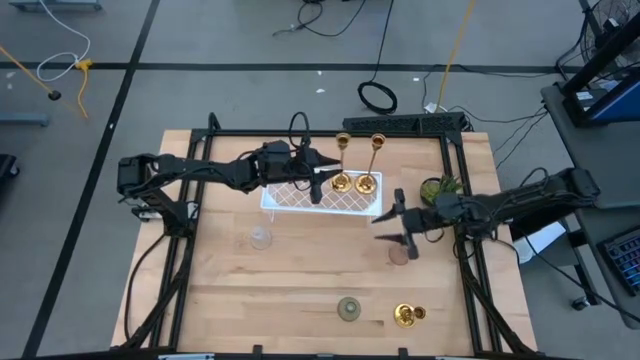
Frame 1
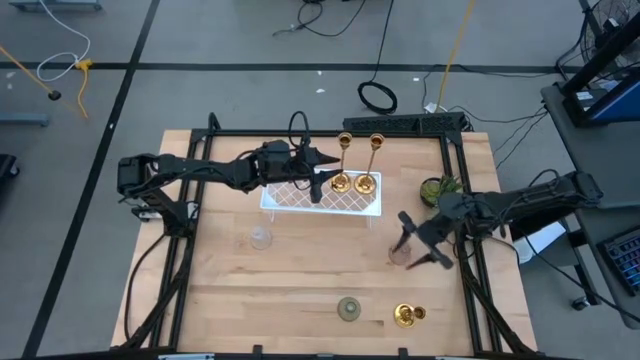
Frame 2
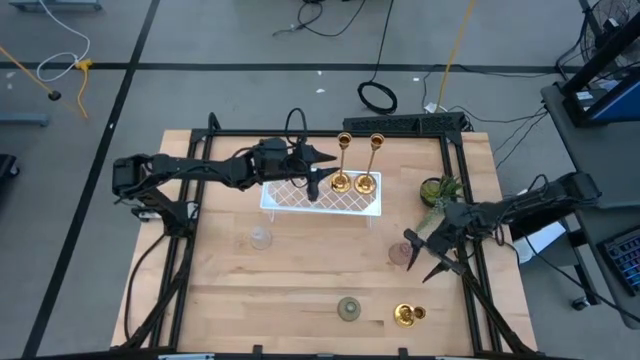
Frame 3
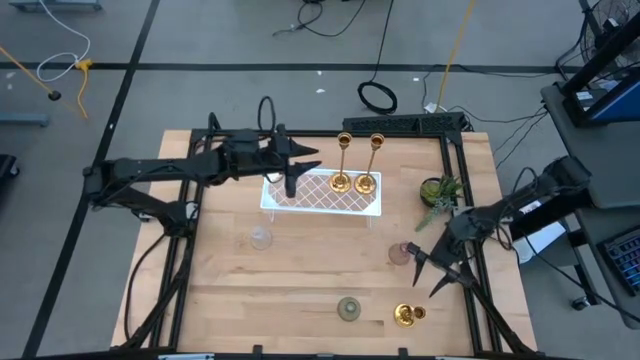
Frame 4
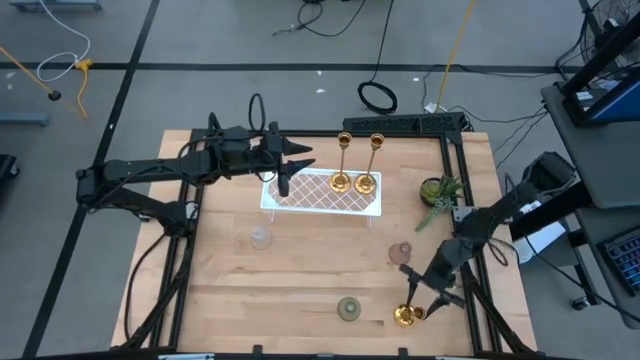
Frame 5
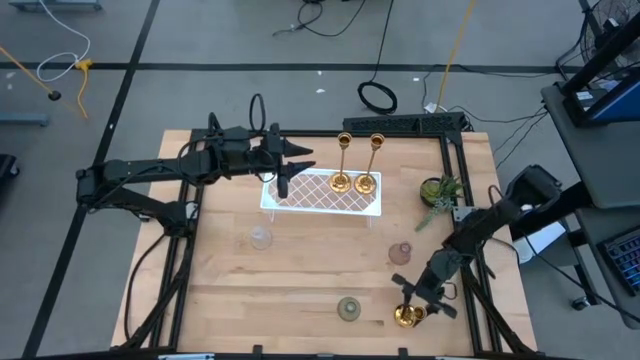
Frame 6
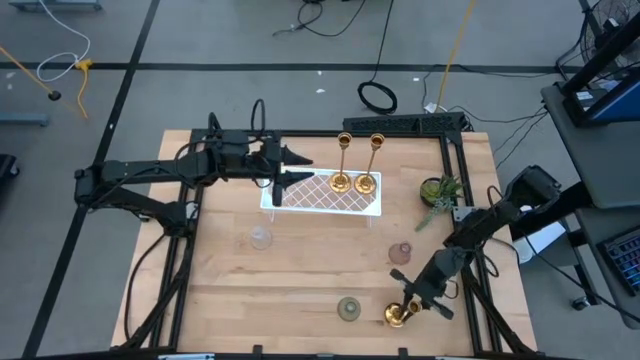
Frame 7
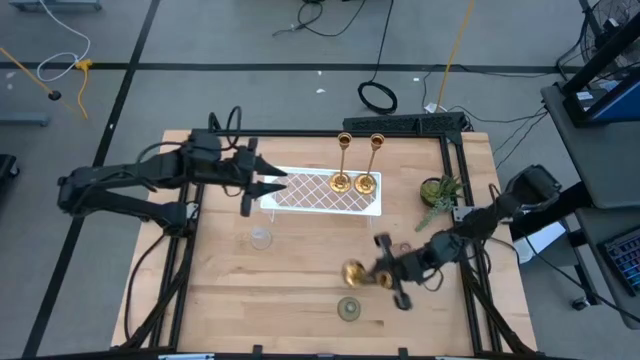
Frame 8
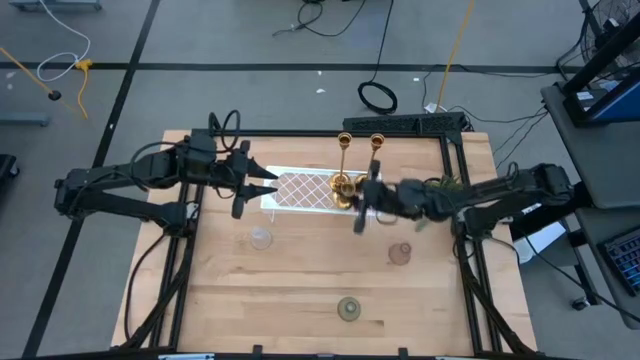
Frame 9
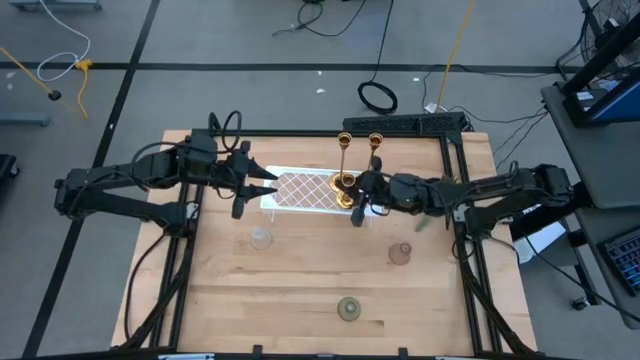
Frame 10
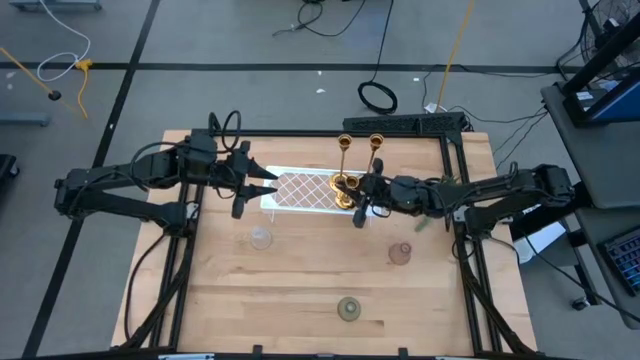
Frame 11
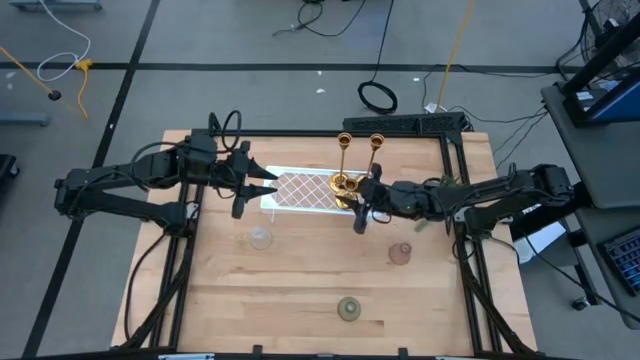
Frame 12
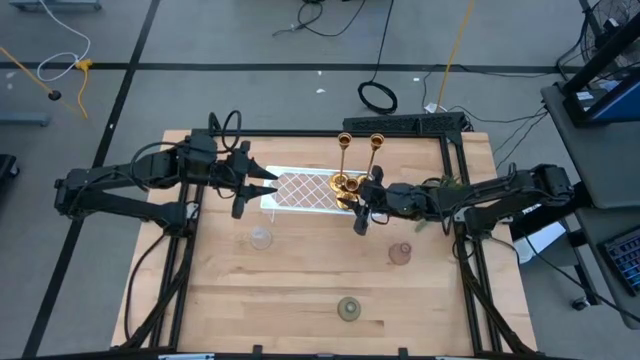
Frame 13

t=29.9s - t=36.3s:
Task: Pick & Place candle stick holders
Put the gold candle holder on the shelf

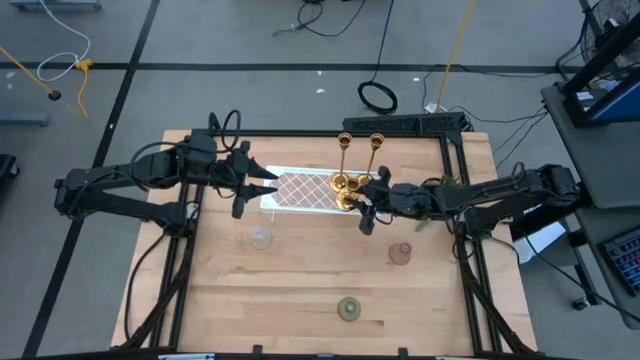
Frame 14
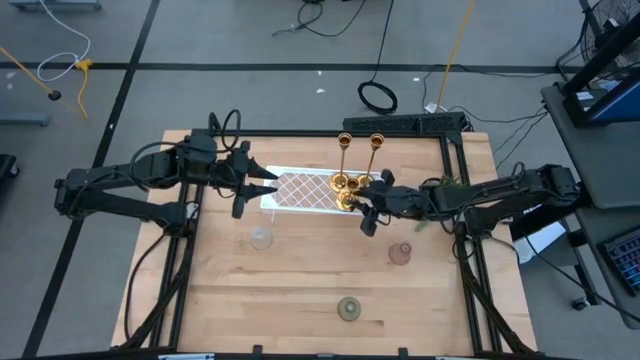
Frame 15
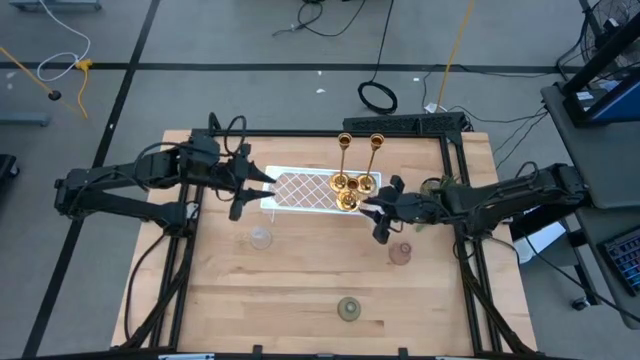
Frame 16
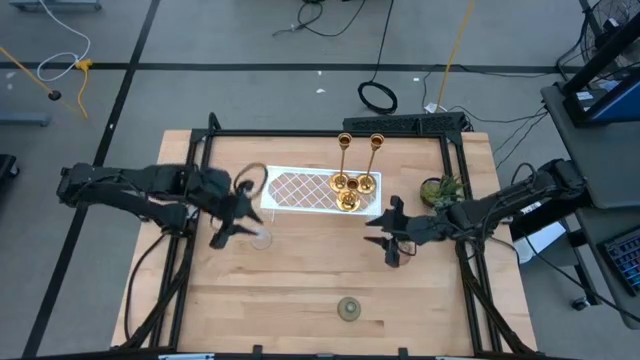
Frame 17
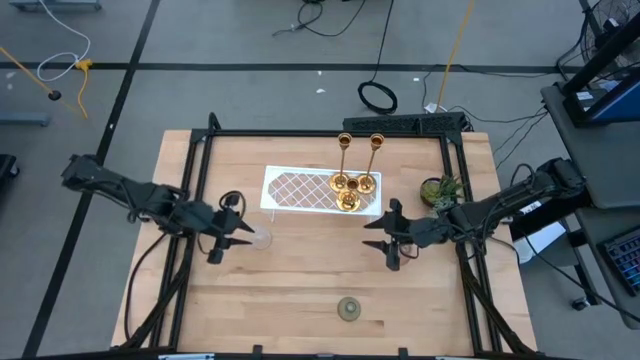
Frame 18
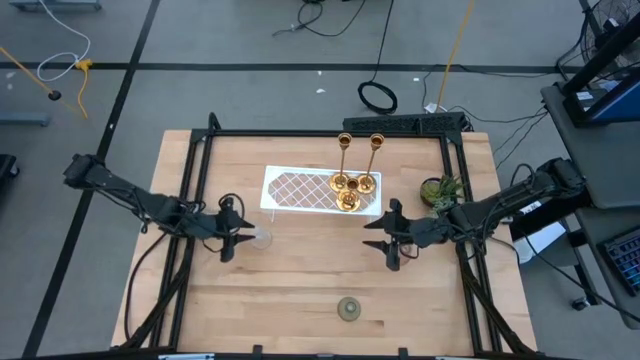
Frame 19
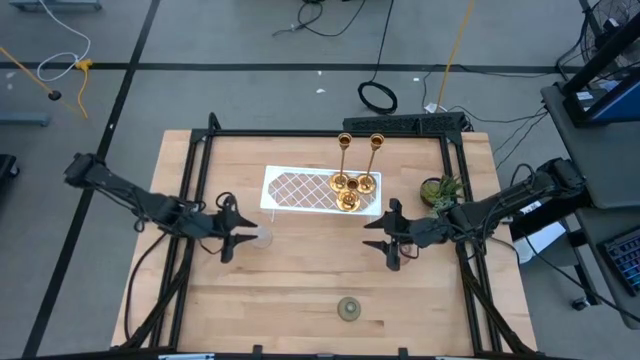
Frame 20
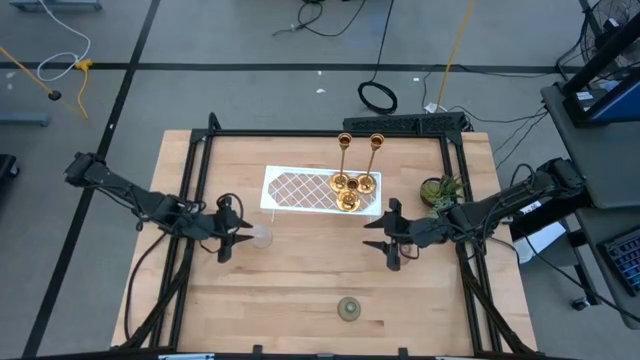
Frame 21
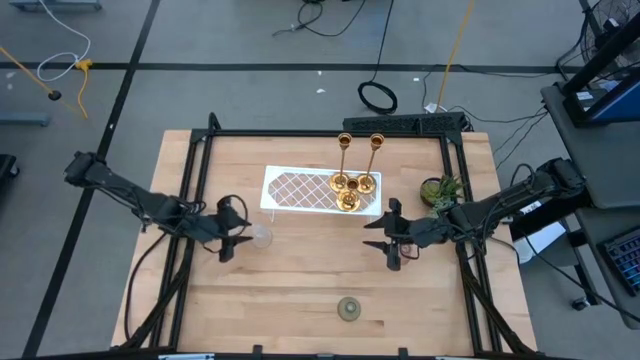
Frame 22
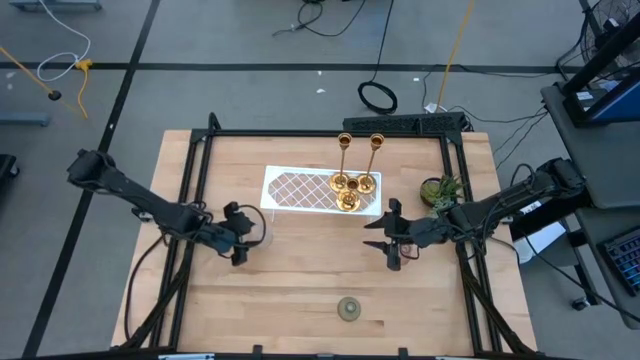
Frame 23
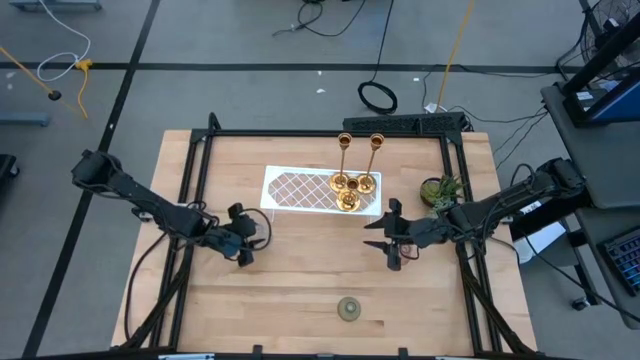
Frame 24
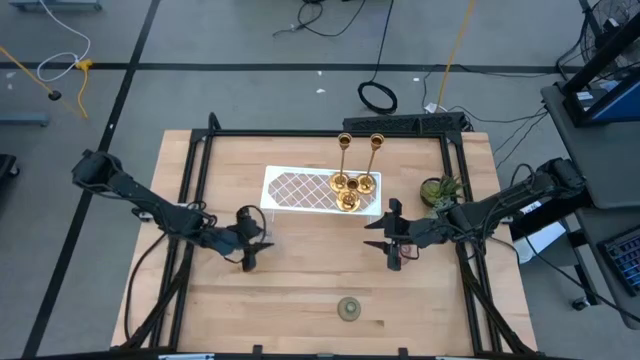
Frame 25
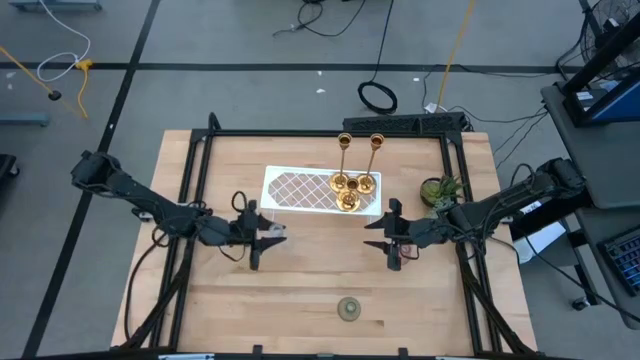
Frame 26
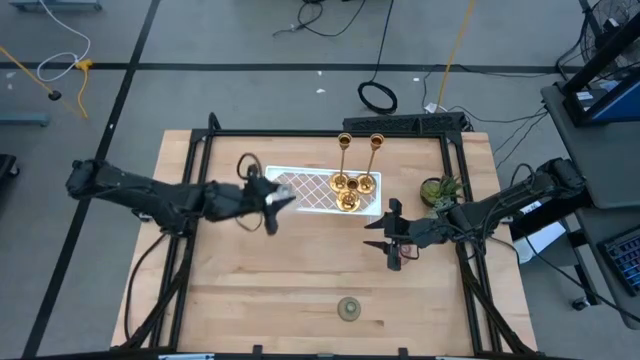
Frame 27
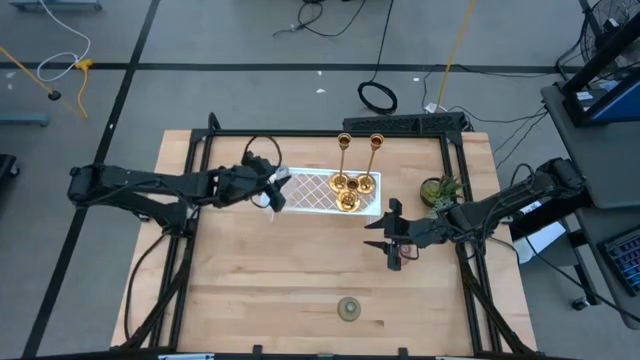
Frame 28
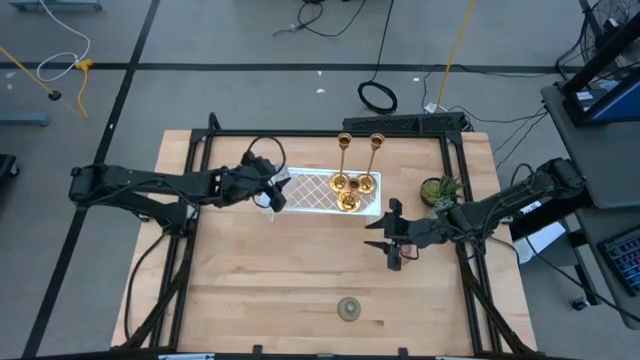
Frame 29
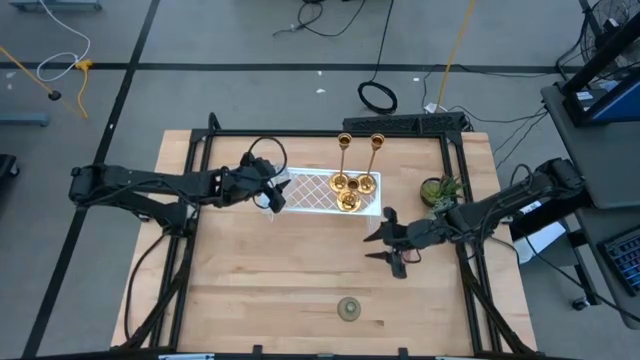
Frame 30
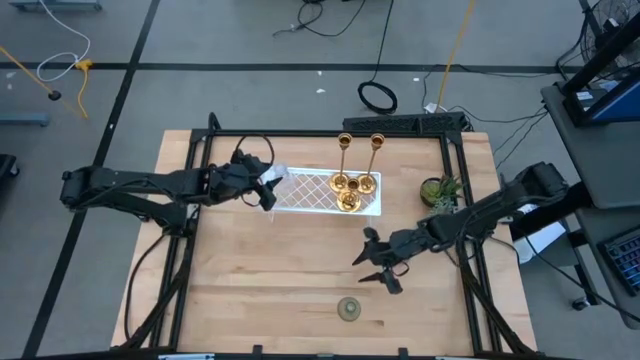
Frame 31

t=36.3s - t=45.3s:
Put the transparent candle holder on the shelf

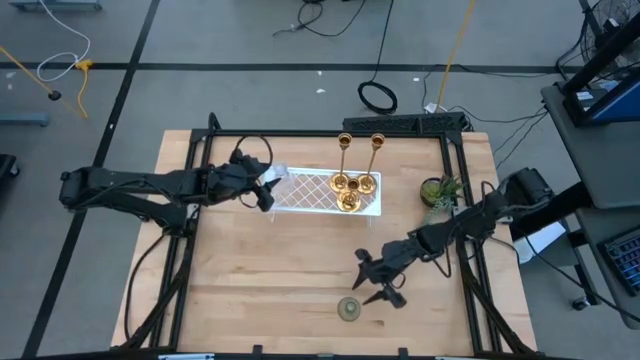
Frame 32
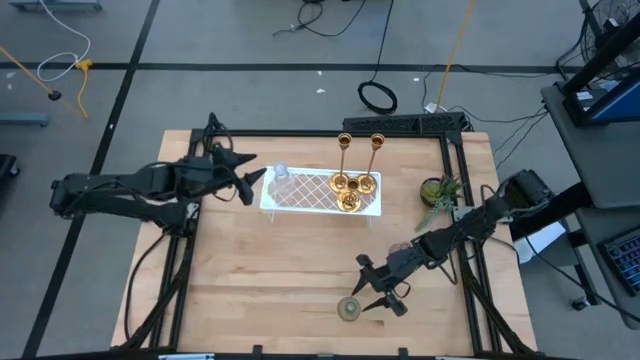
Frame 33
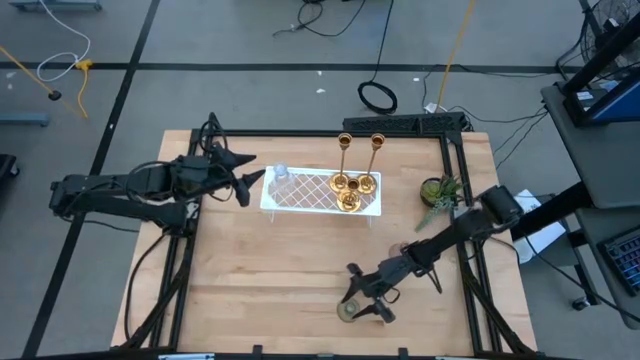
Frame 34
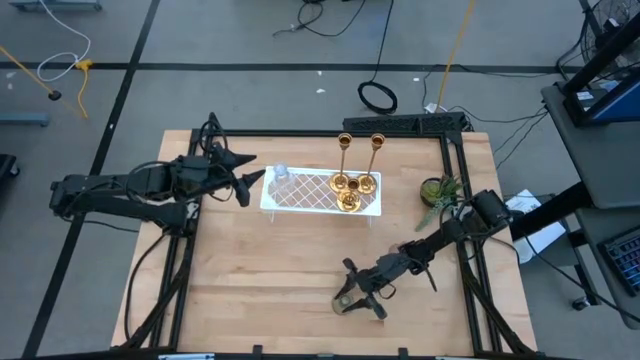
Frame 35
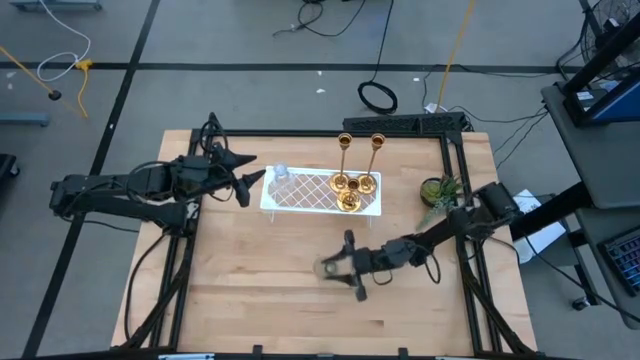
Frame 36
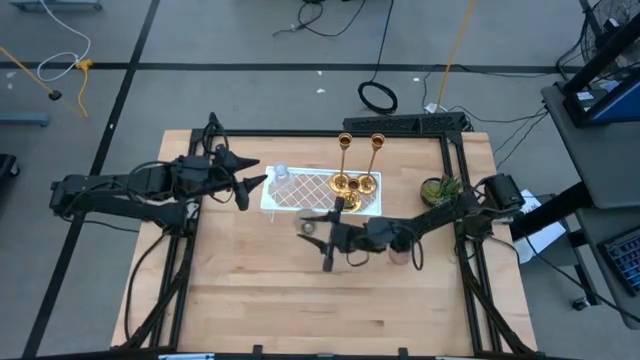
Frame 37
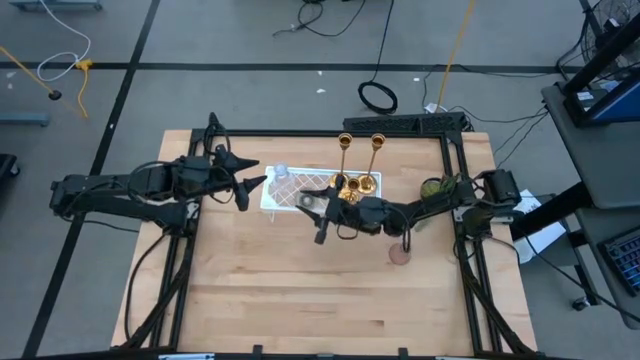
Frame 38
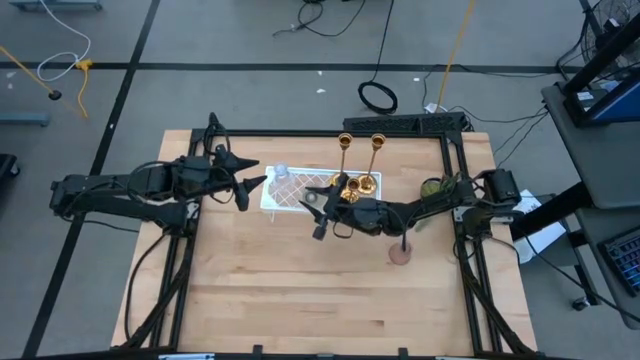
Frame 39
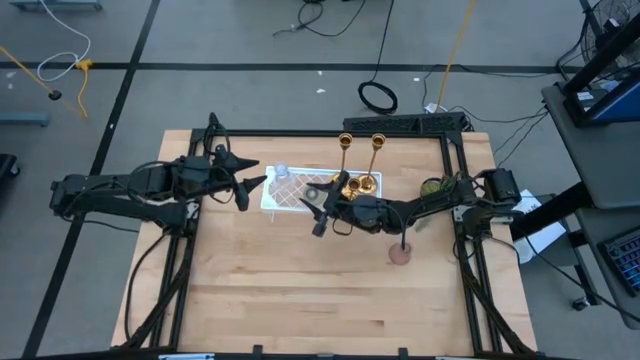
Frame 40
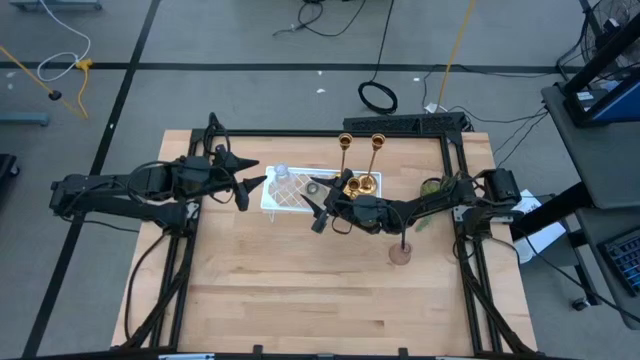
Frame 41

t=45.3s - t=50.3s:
Put the green candle holder on the shelf
